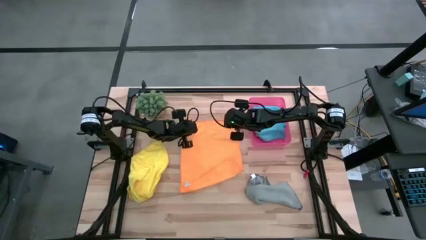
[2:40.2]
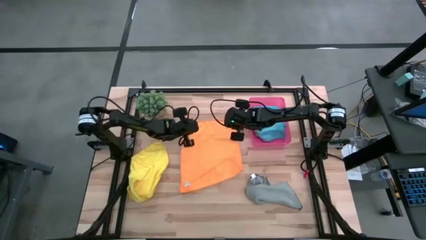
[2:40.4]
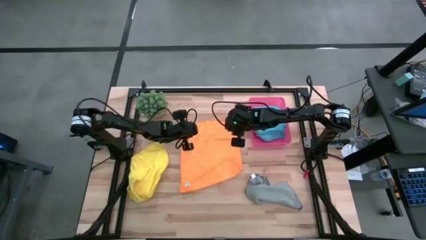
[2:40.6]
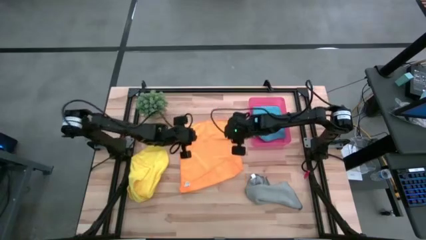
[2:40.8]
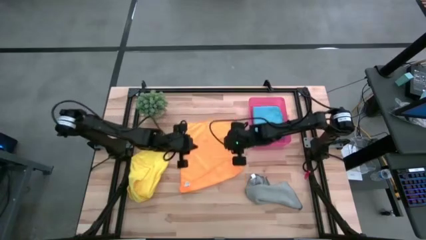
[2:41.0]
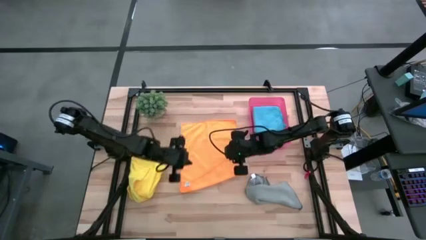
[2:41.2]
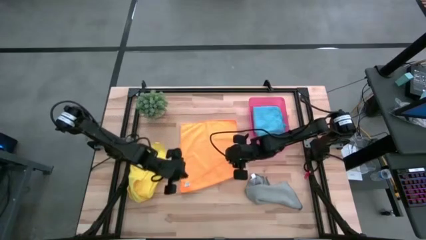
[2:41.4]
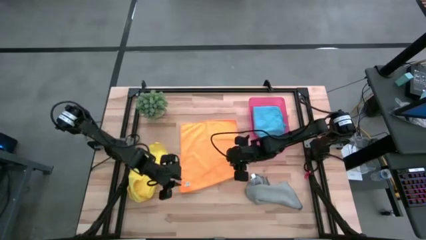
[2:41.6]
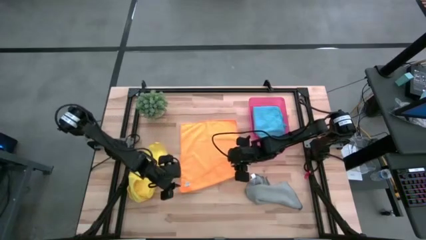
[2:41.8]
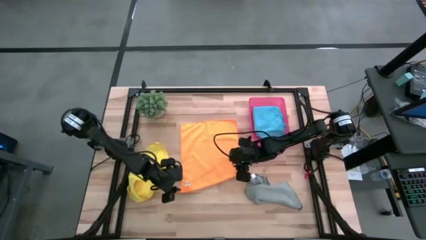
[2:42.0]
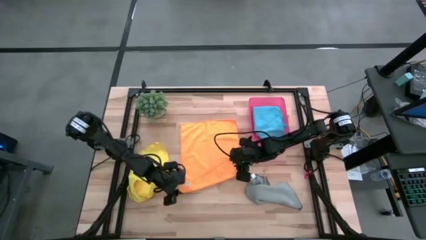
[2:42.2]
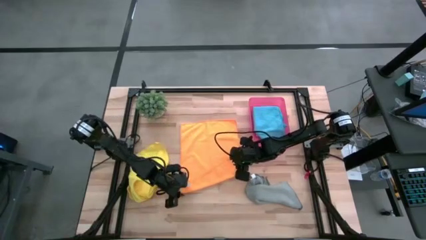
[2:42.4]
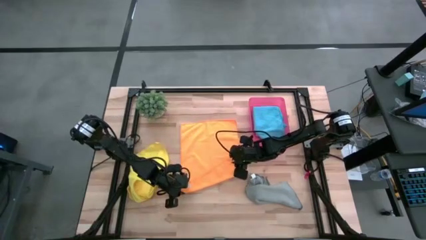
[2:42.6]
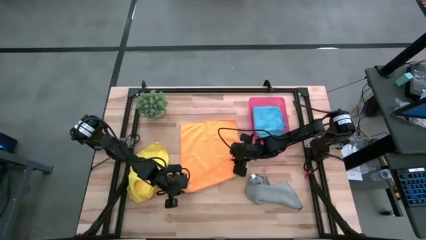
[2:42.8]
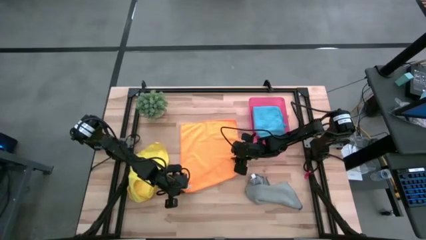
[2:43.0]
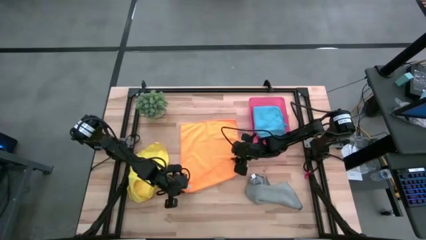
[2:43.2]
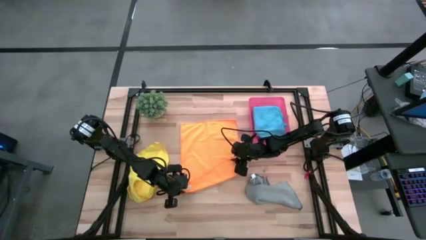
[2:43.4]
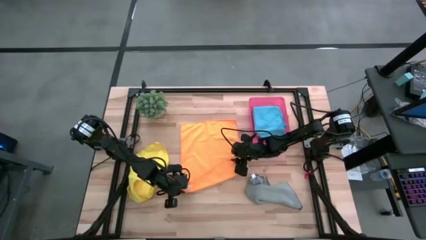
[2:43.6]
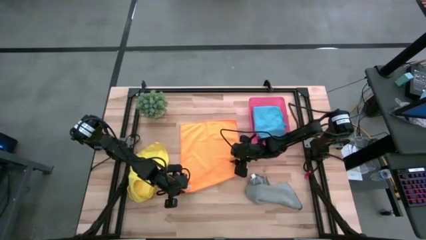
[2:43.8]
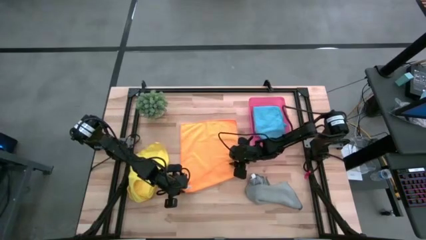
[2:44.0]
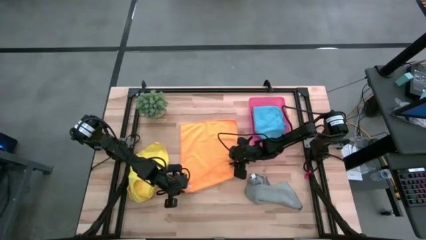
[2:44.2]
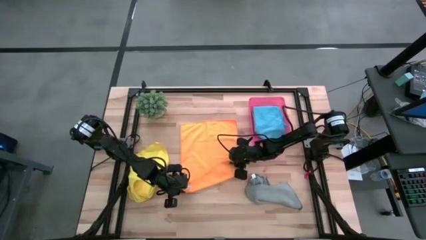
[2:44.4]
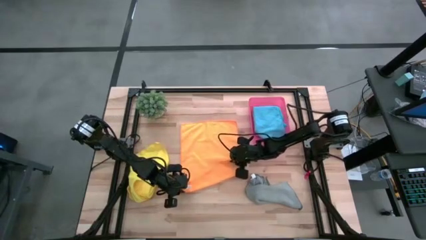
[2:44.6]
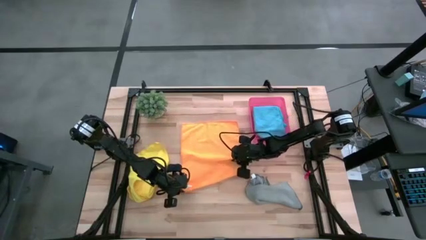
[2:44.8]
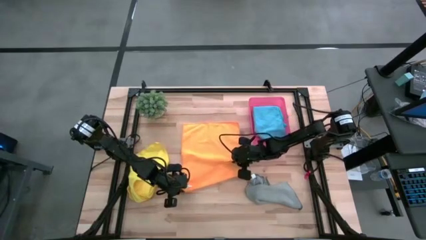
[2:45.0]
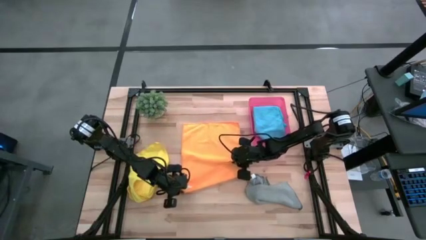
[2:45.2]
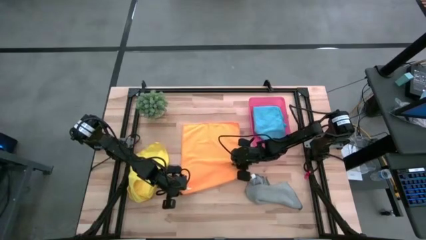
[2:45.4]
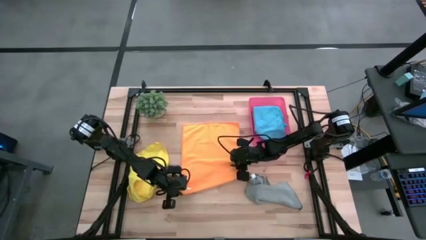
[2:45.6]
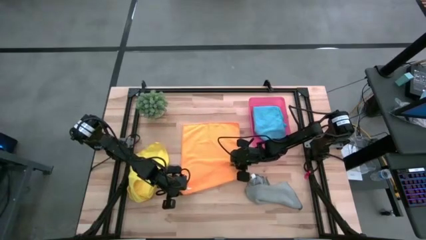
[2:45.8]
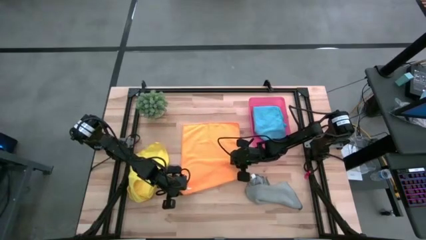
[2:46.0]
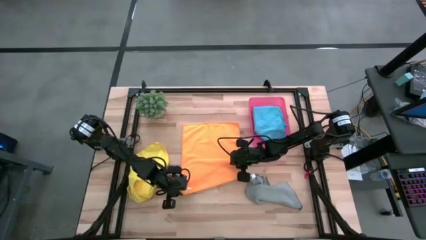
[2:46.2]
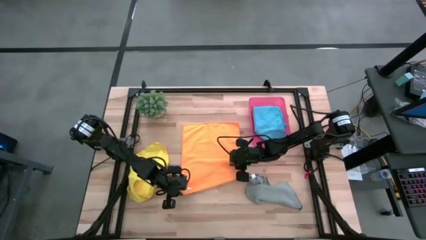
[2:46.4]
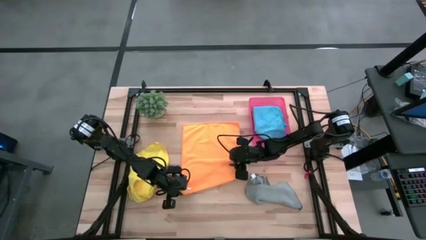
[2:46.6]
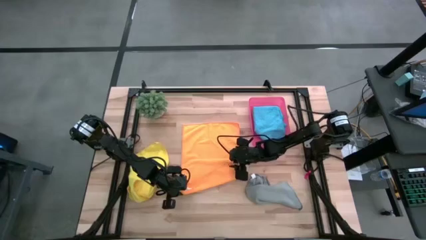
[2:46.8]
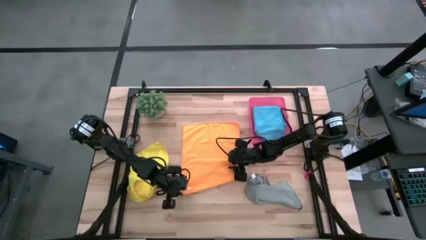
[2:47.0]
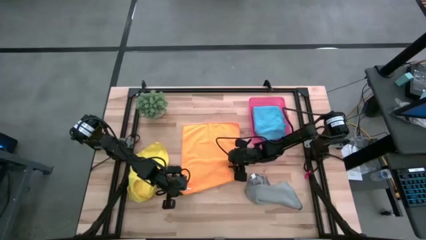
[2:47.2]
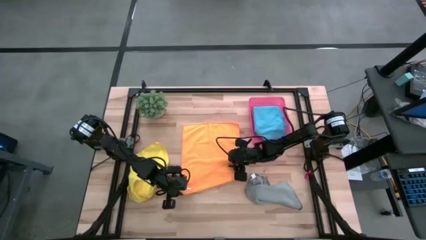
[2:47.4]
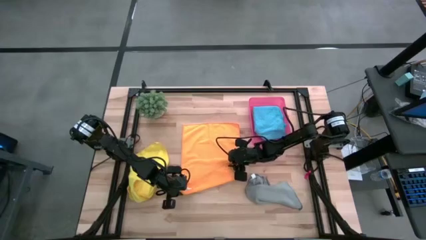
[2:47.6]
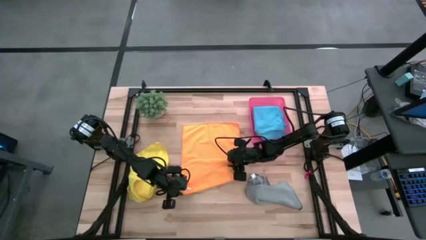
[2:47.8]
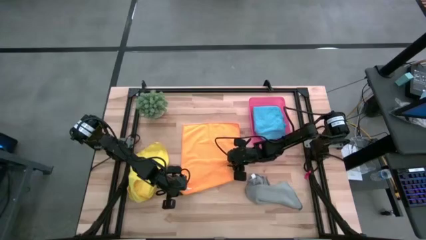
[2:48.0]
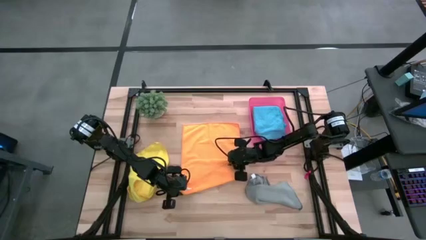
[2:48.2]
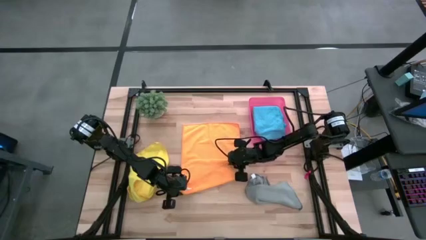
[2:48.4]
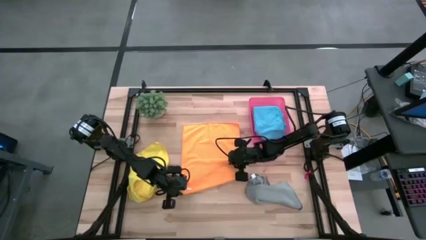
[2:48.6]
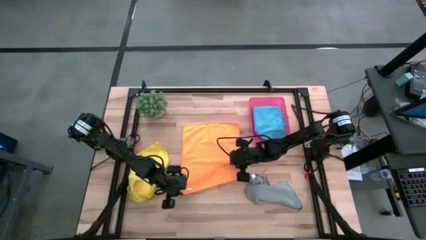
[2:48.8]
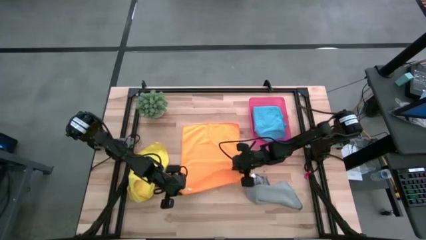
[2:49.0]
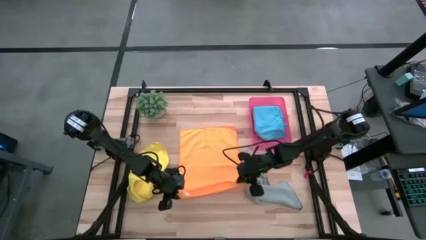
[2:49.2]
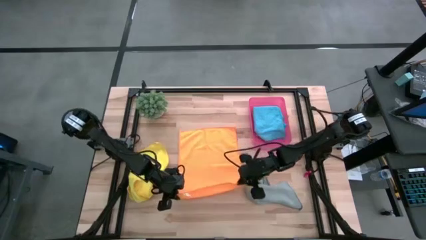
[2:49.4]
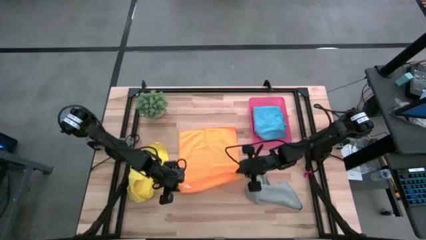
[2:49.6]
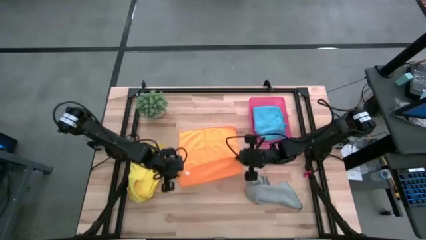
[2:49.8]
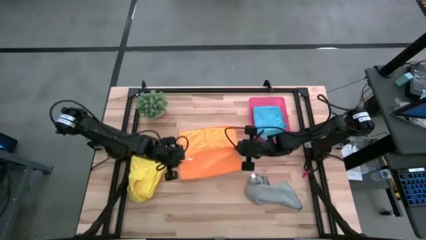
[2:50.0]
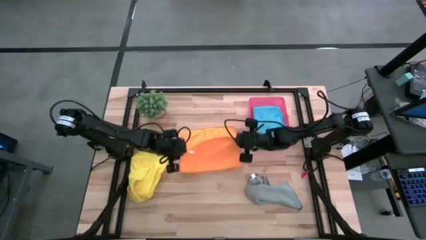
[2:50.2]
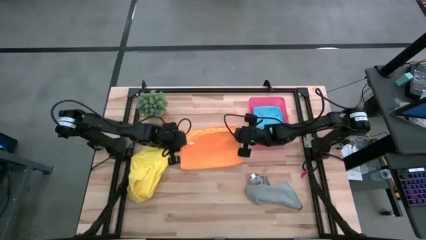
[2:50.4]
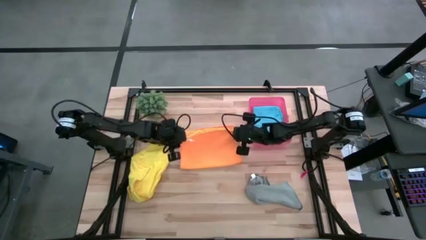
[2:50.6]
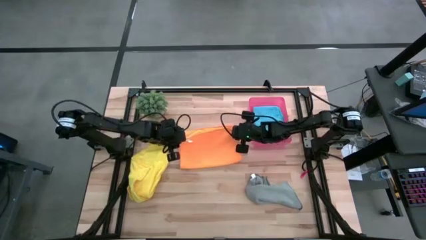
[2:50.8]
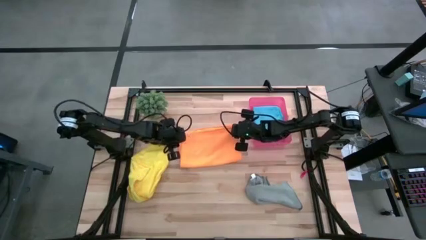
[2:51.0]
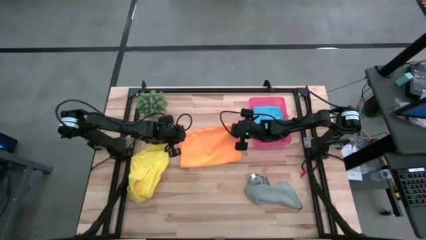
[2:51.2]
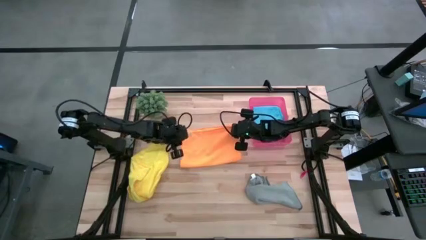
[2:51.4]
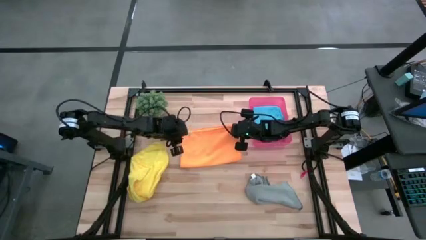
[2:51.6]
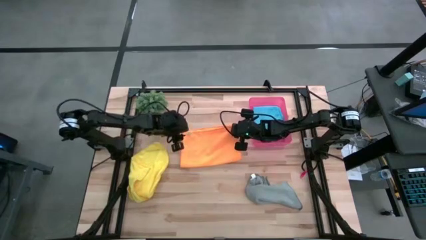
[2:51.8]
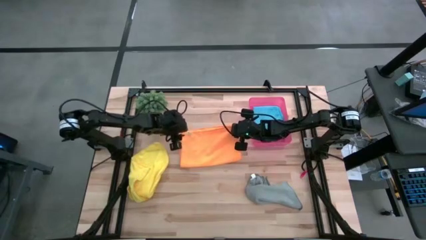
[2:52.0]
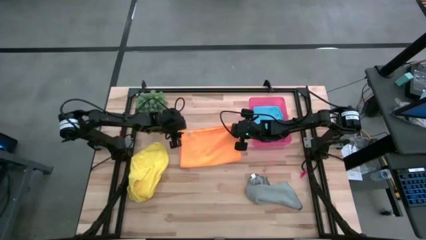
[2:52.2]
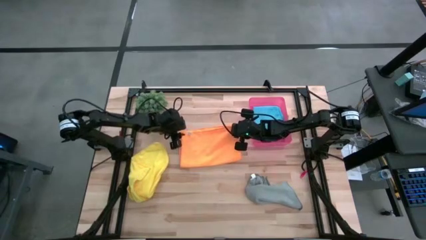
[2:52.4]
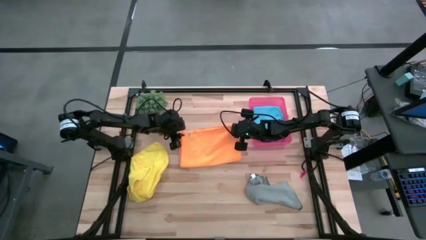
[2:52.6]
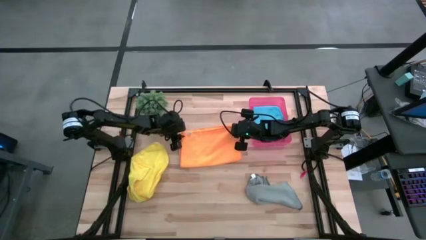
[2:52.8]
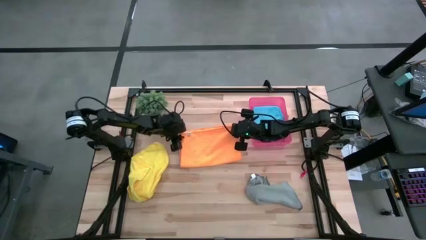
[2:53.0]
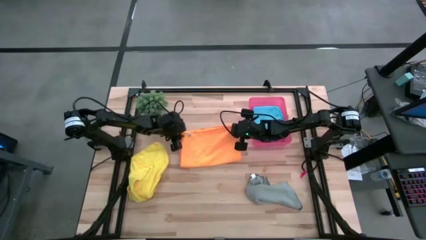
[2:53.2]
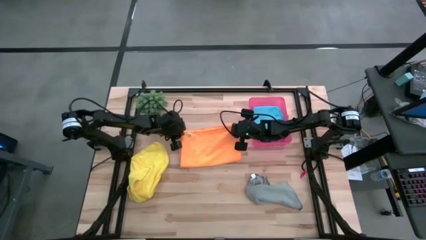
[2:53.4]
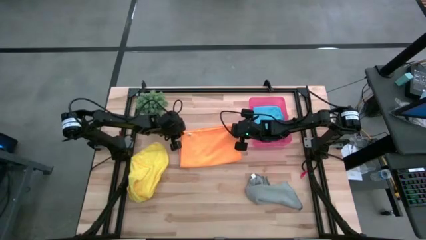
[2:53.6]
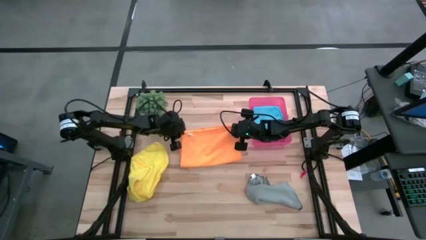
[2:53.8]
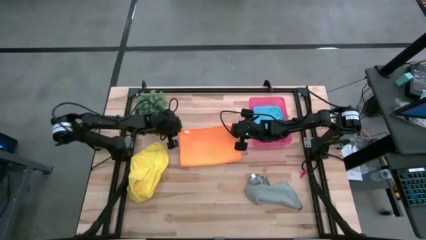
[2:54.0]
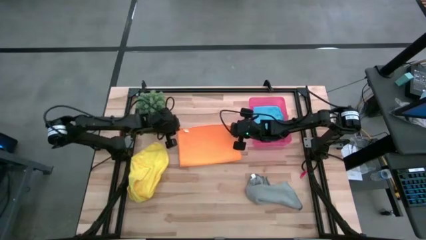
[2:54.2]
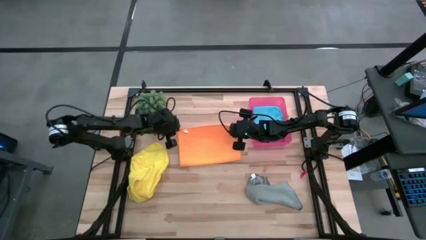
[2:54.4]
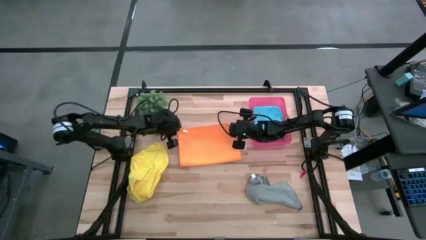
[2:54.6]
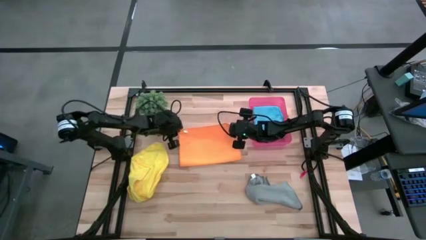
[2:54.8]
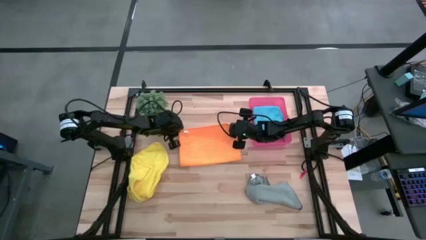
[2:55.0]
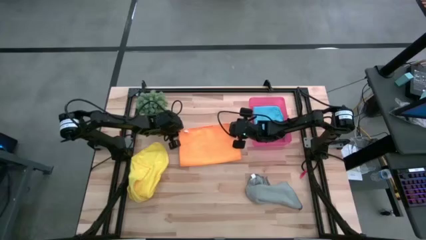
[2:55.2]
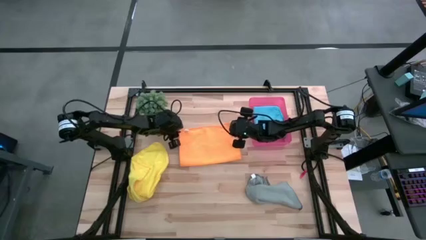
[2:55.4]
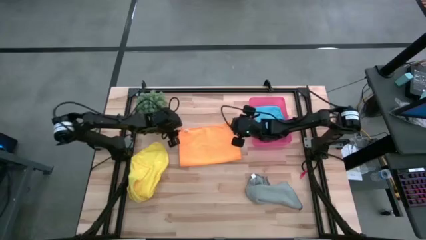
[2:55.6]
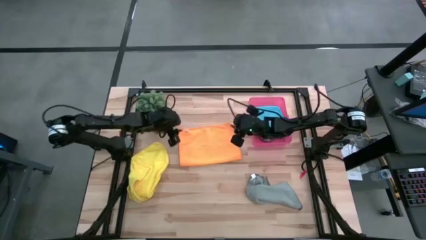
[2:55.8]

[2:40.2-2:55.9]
Task: Fold microfiber towels
Fold the orange microfiber cloth
